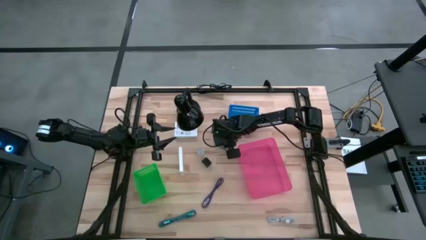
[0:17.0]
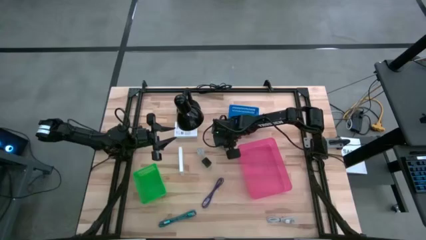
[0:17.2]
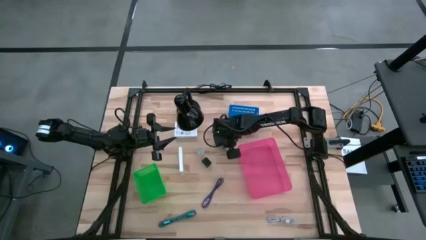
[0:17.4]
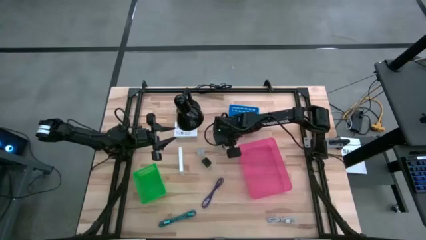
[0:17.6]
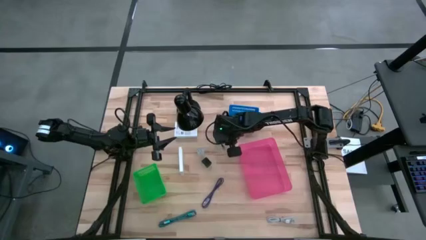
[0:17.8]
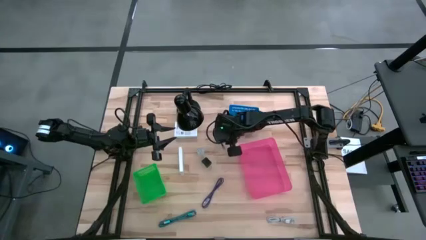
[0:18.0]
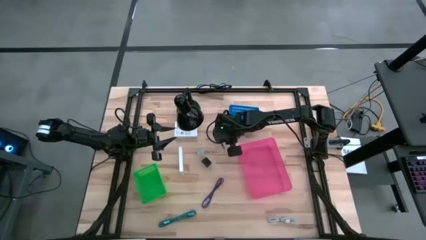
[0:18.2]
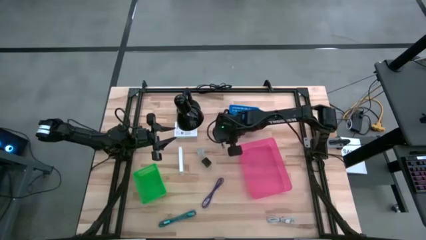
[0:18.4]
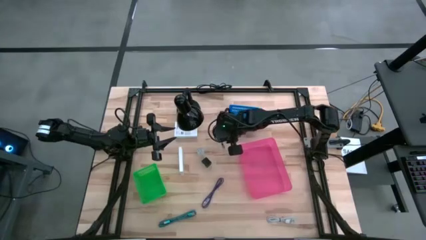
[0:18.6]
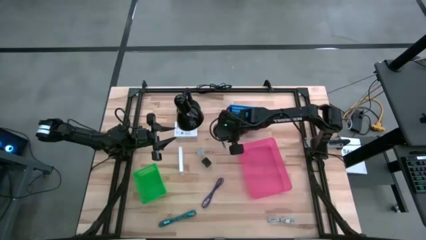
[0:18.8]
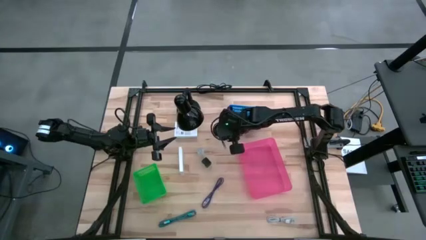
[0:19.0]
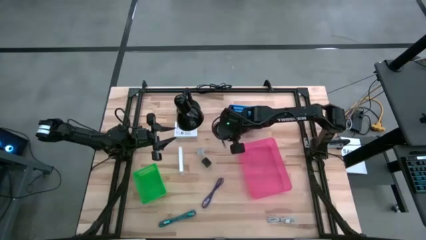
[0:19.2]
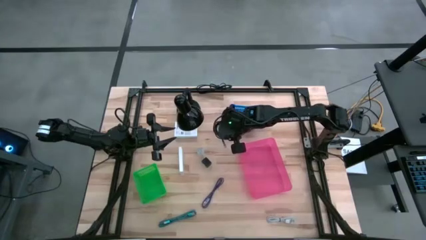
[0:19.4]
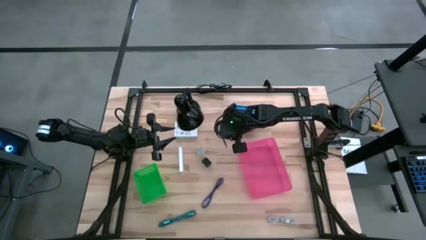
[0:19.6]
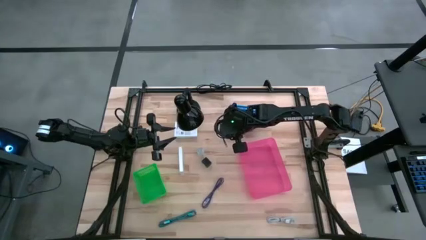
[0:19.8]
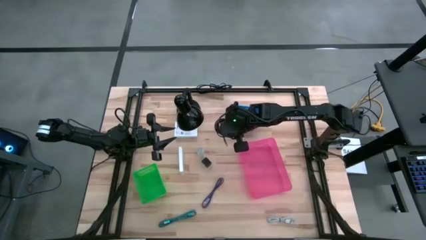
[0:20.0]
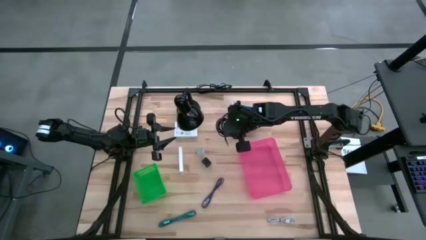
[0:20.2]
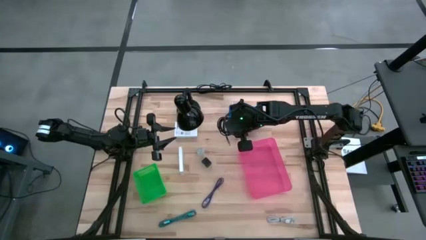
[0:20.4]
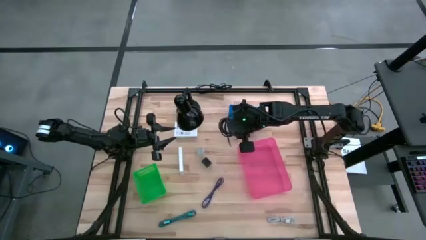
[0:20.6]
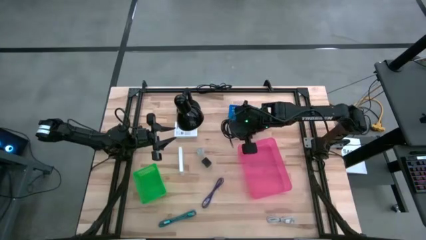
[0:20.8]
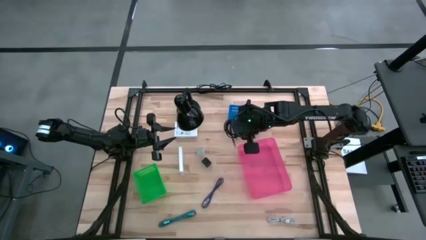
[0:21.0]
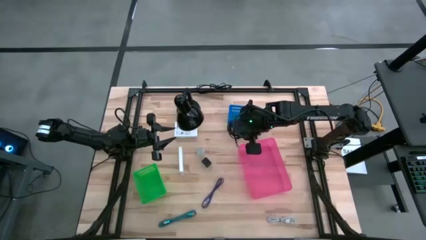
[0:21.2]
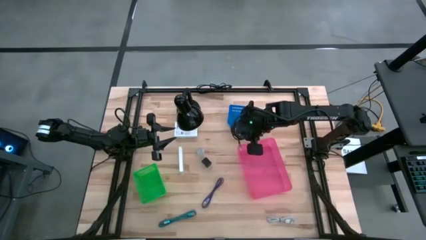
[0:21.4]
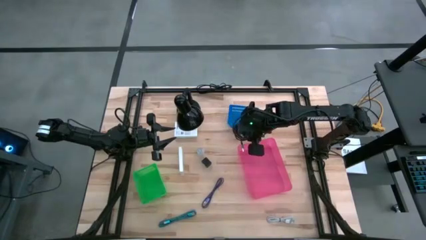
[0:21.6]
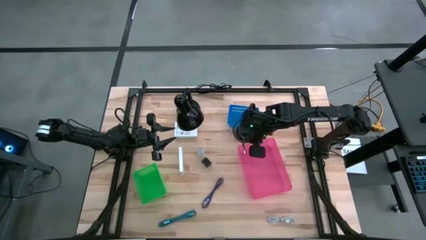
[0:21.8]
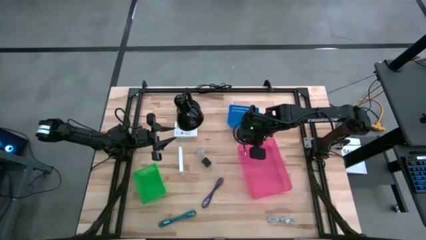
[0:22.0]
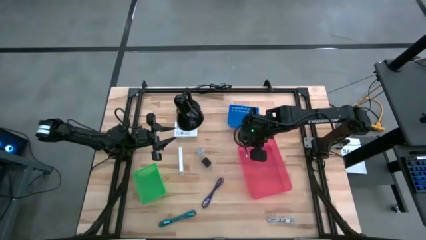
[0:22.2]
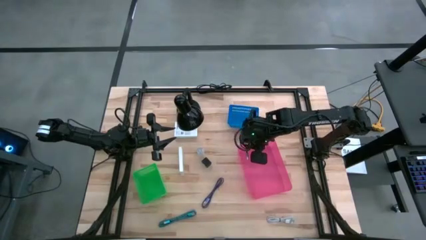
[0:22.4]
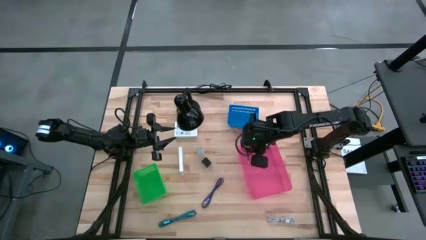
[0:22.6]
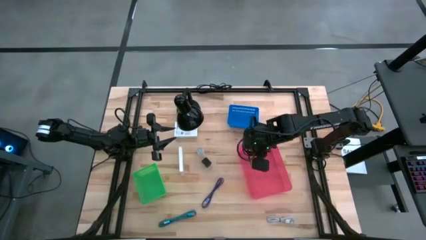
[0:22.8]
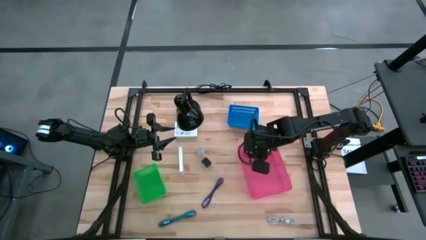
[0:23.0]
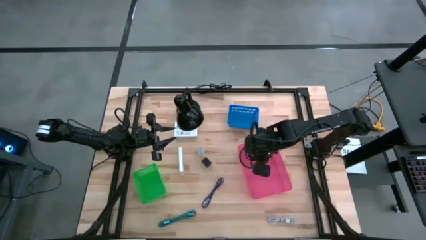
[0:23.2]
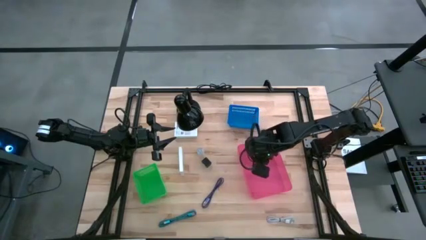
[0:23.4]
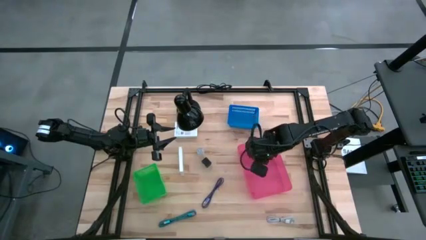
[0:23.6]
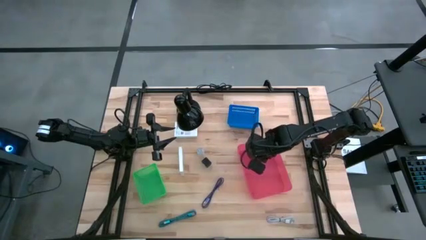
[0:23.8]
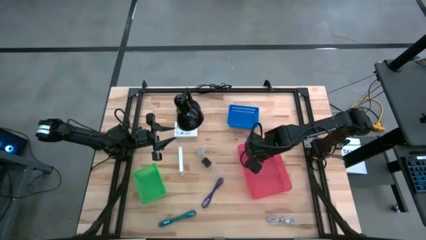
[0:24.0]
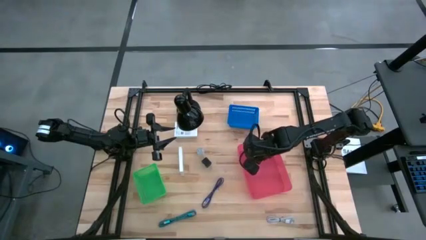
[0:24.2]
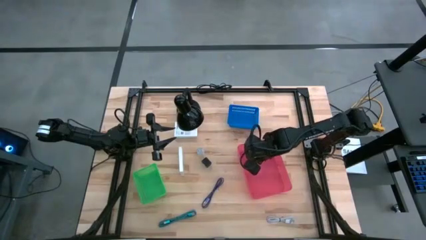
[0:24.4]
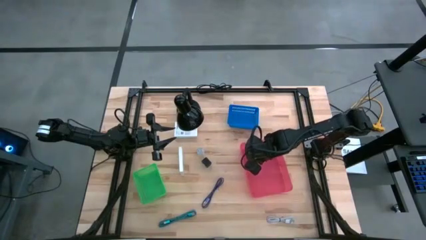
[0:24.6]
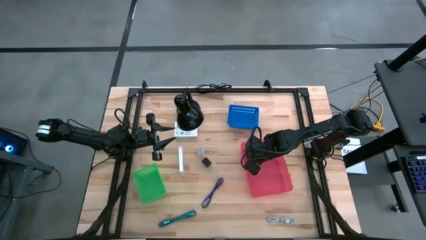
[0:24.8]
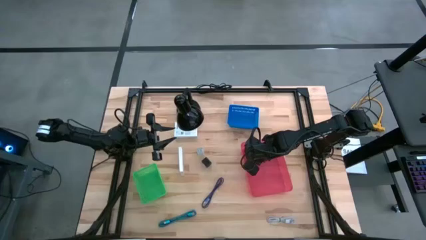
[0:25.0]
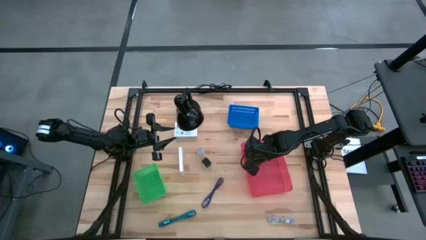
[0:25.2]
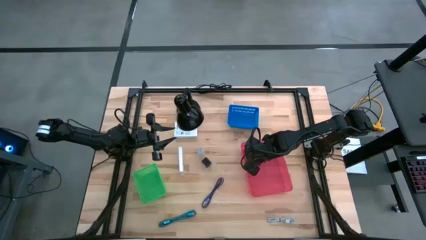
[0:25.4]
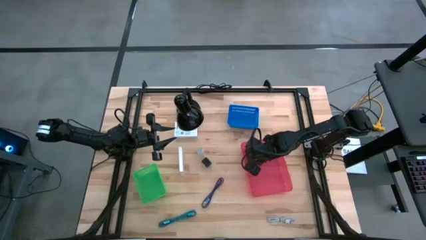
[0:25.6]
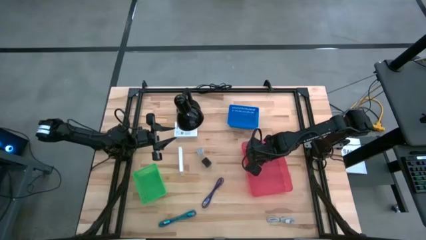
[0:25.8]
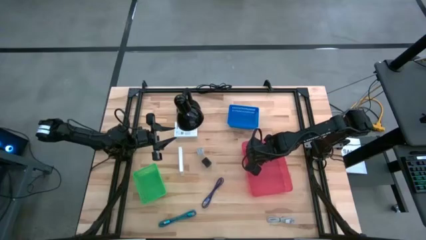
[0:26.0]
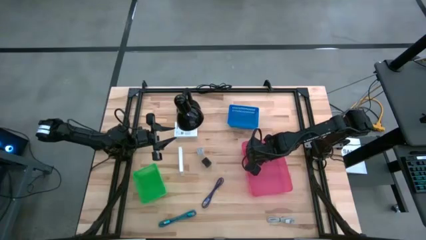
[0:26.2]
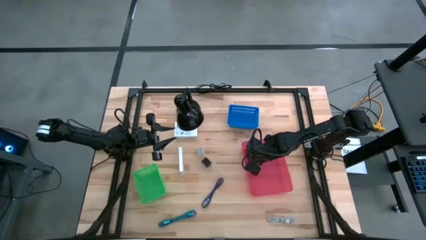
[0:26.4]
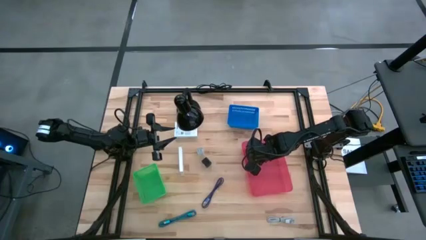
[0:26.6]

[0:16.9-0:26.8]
Task: Pick and place items into bin
Put the black charger cable into the pink bin

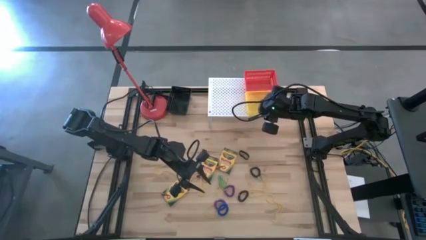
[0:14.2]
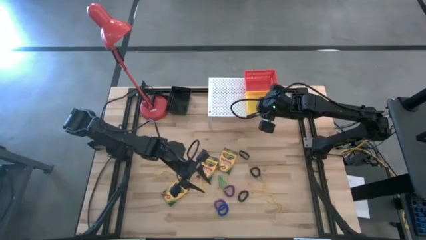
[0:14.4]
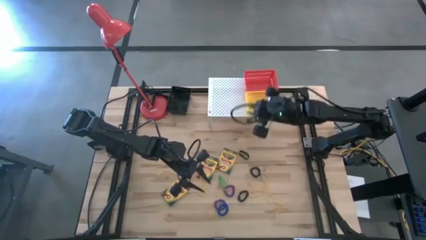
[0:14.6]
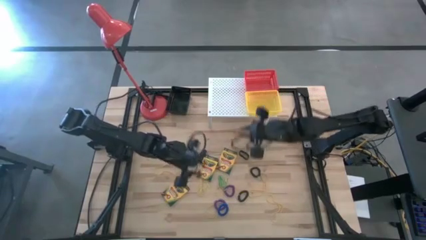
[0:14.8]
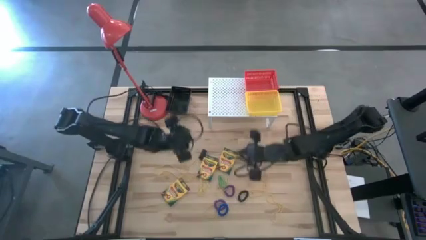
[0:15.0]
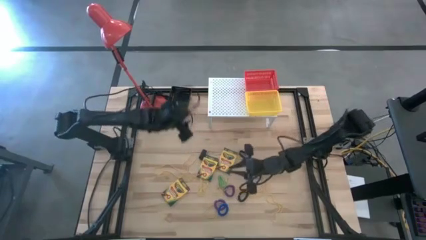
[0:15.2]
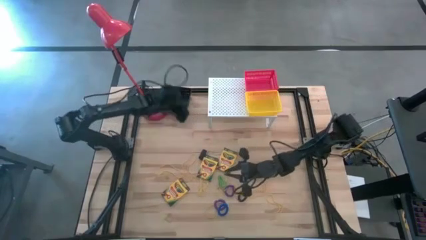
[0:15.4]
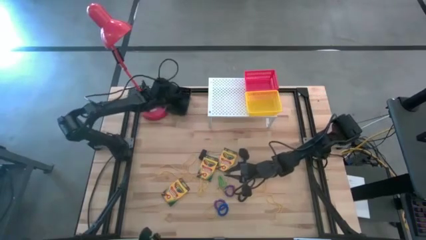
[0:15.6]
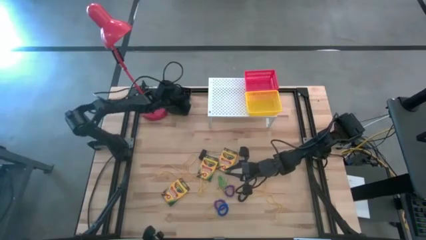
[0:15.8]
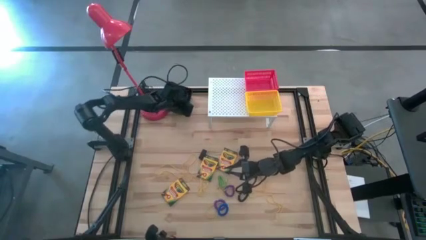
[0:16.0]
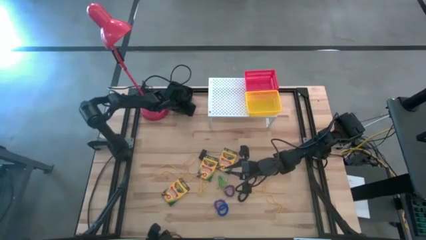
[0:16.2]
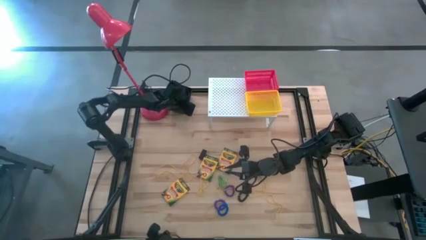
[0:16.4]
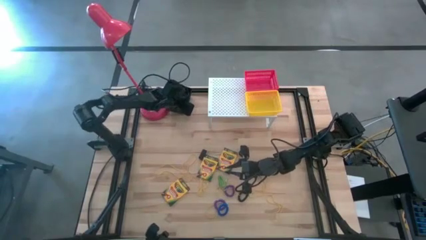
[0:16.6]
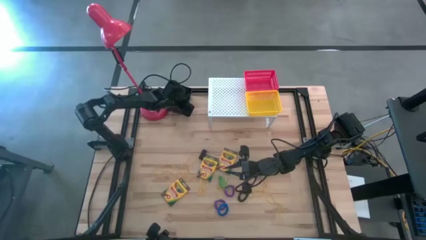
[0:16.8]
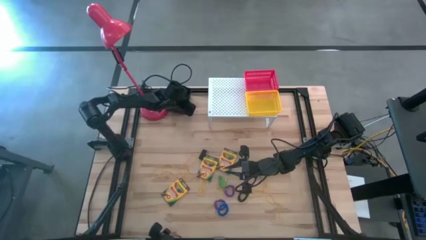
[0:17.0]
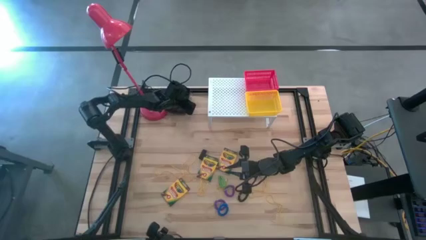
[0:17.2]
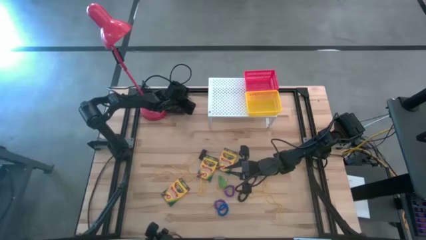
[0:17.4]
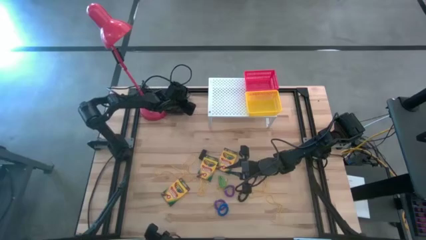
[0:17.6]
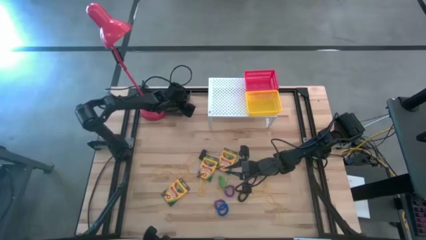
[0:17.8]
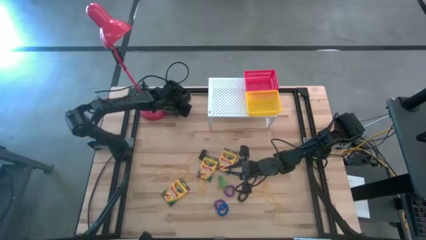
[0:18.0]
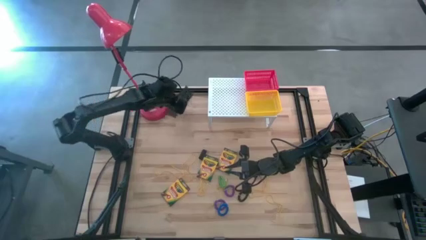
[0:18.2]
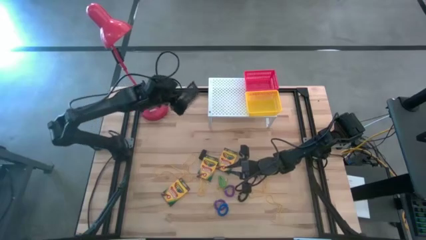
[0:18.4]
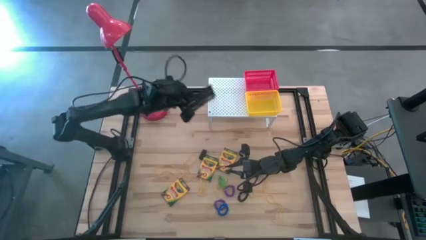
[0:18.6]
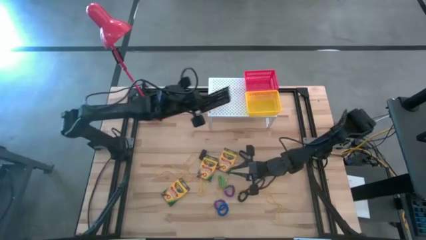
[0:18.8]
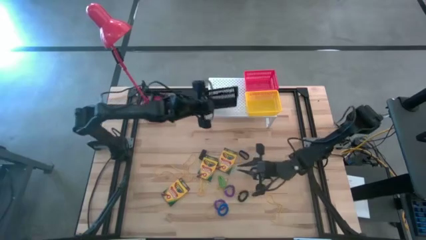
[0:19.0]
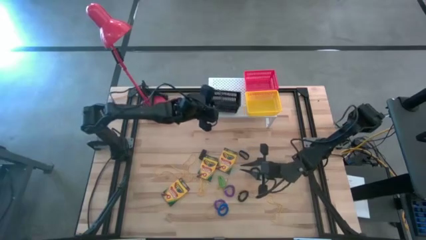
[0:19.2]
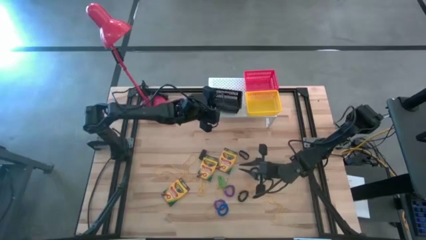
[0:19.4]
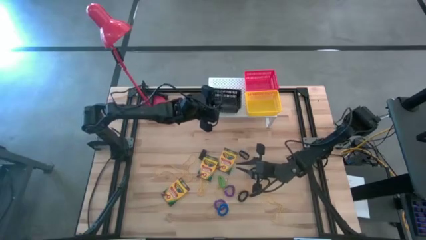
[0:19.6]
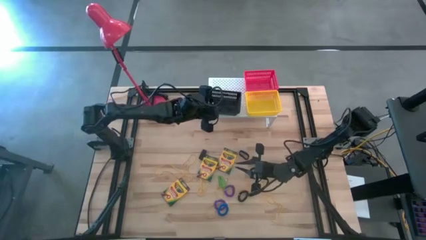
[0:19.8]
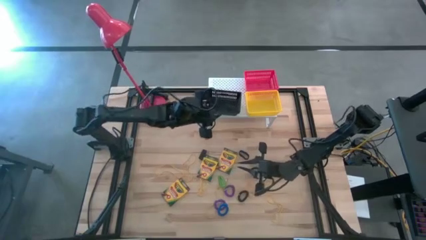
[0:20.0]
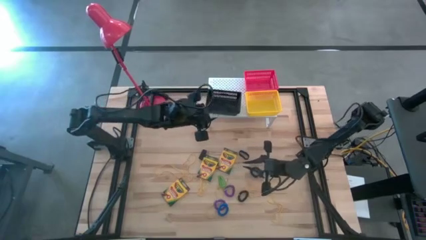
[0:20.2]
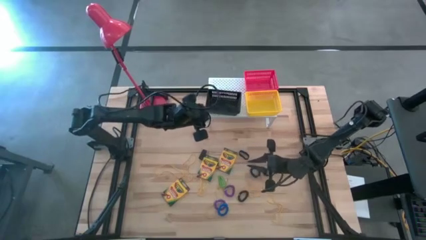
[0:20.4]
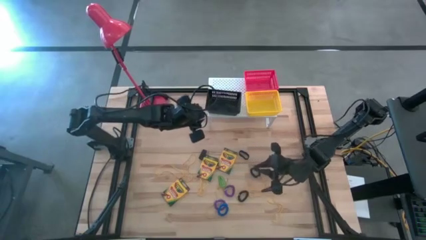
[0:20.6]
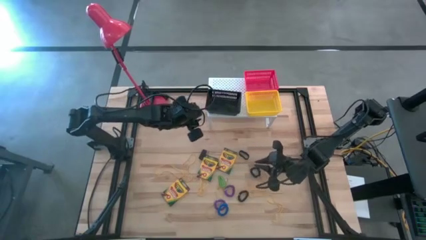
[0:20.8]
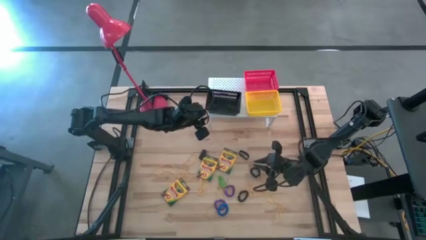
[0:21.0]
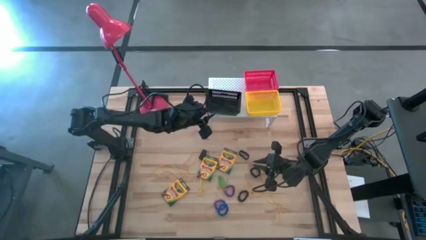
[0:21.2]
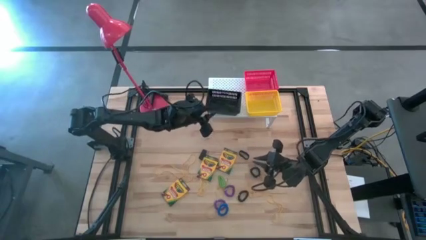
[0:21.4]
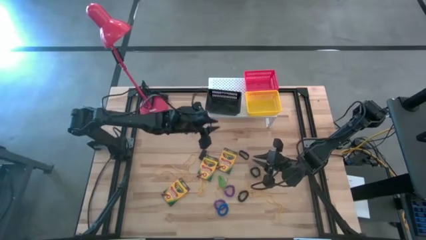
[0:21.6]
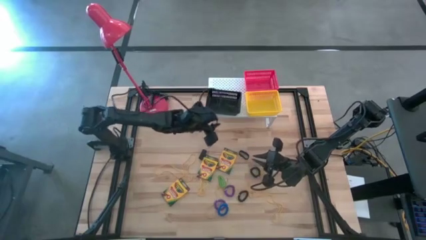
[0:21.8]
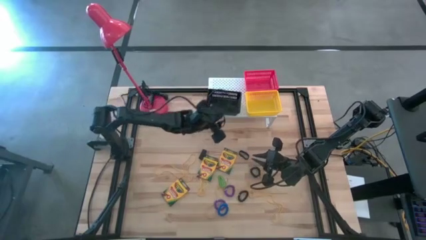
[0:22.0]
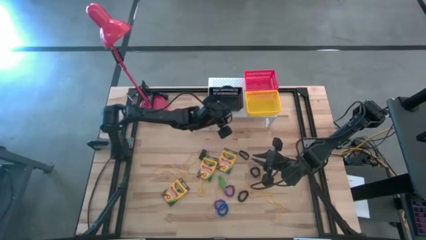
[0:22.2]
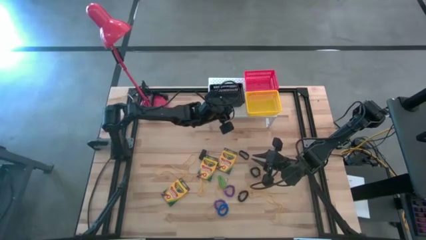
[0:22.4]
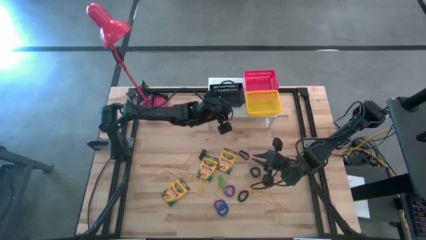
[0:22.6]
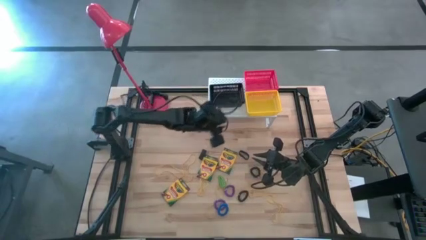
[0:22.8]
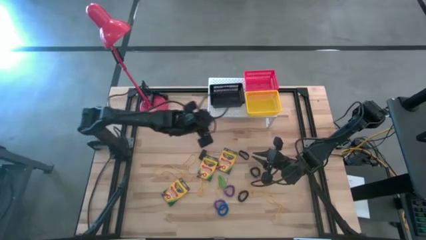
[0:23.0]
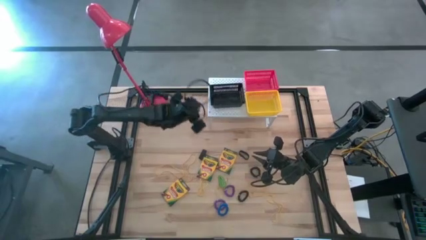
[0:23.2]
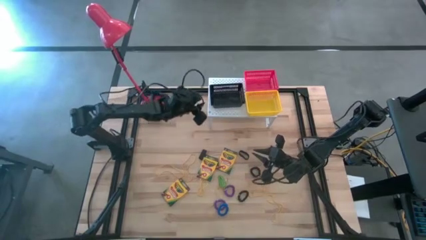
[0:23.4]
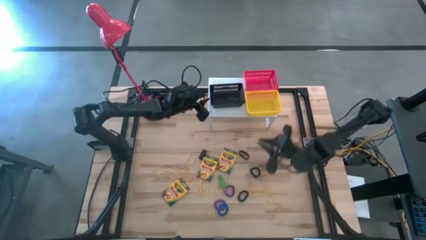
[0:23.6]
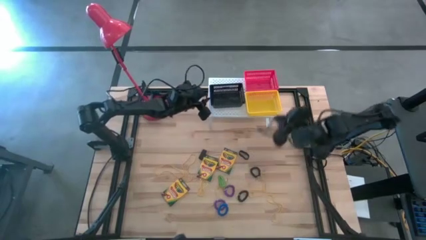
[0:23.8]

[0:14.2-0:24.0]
Task: Pick & Place Office Desk Supplies
Put the black bin on the shelf
